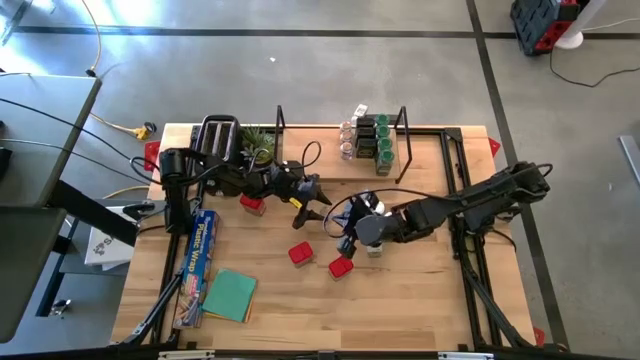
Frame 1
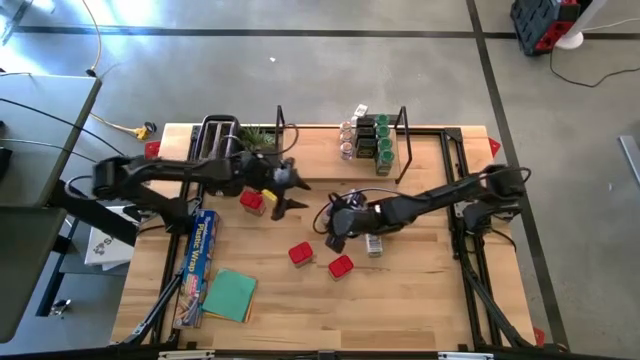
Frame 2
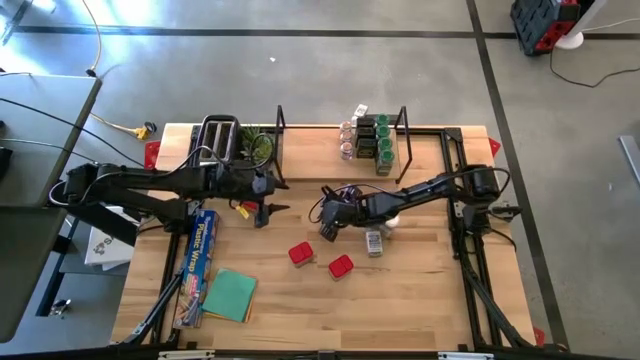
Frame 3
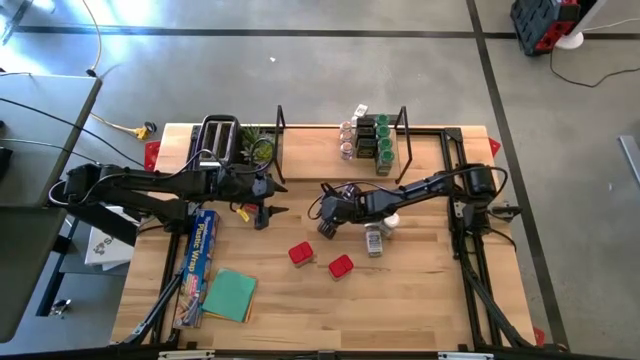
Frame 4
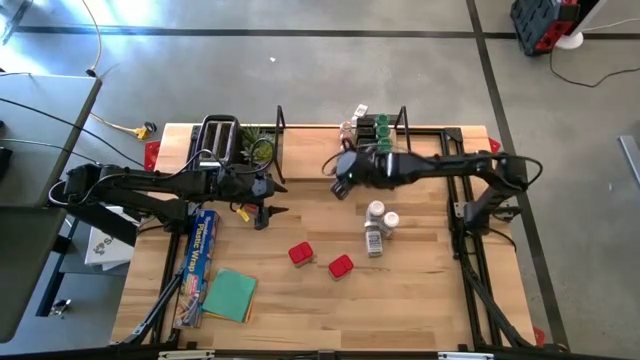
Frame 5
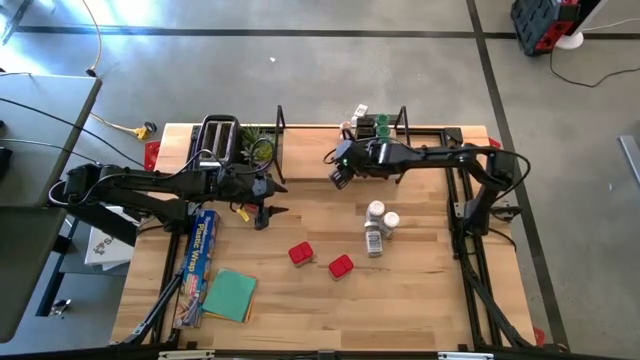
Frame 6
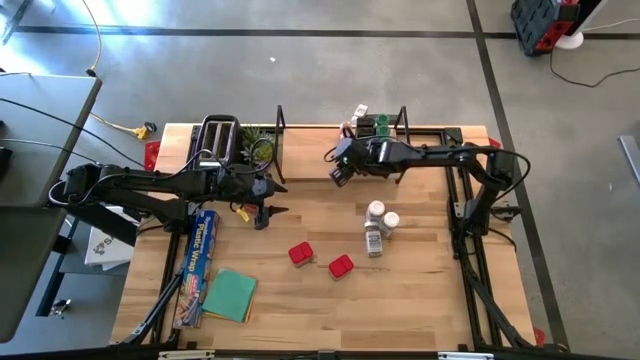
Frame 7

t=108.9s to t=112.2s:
Task: Shelf spices
Put the brown seasoning bottle on the shelf aligned with the other brown seasoning bottles

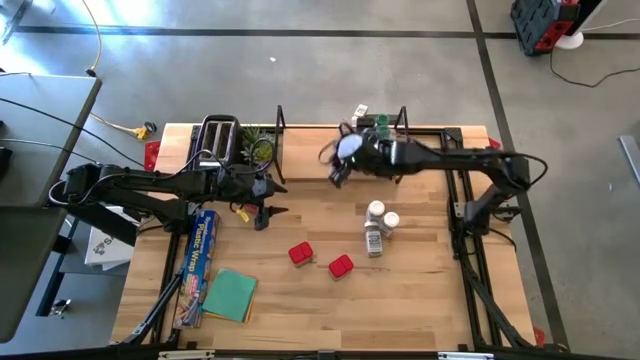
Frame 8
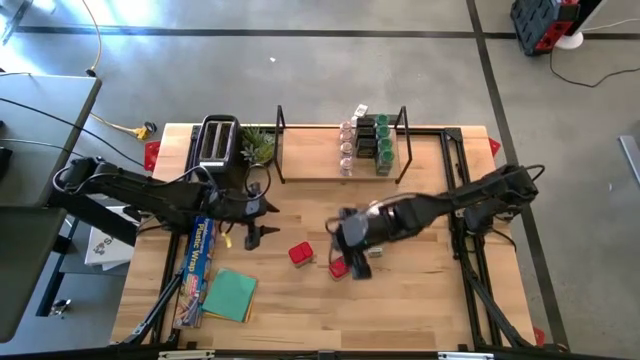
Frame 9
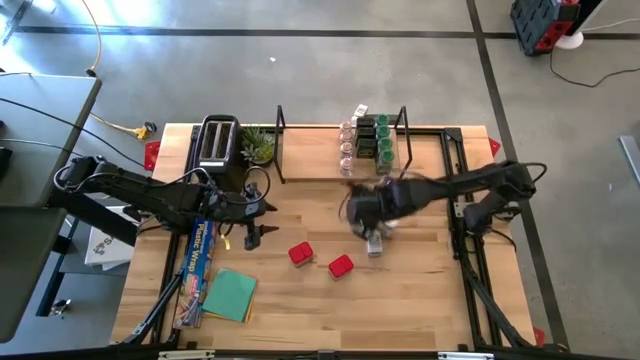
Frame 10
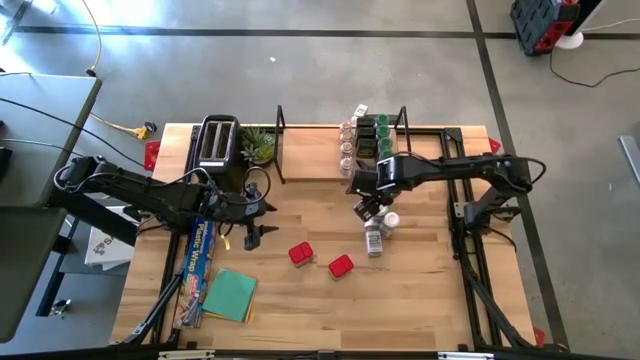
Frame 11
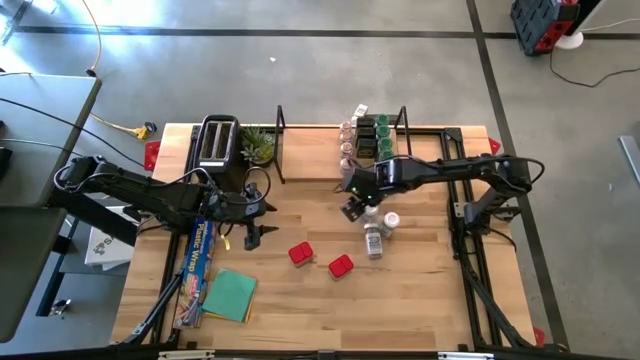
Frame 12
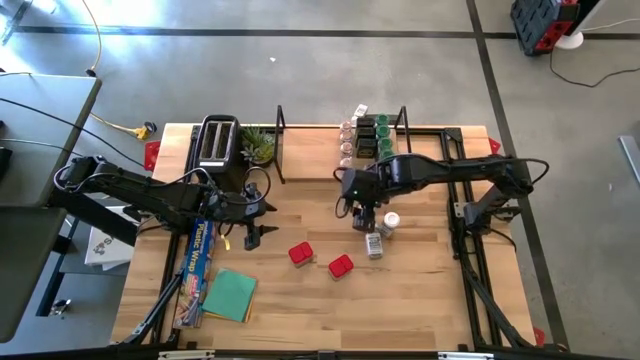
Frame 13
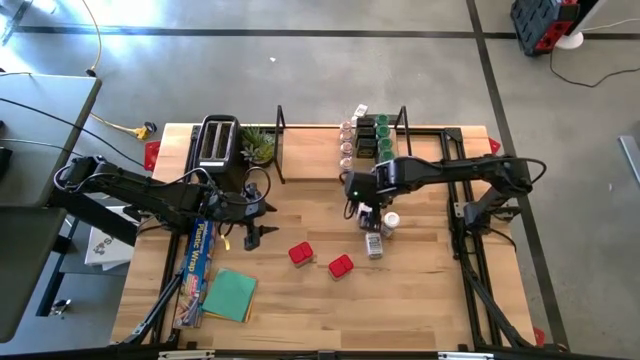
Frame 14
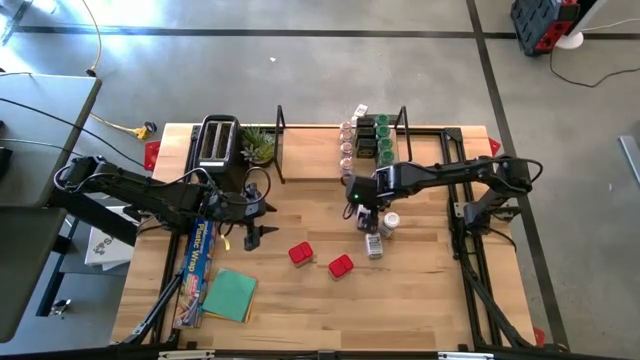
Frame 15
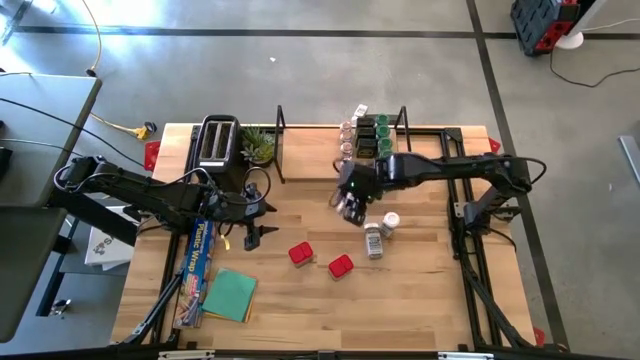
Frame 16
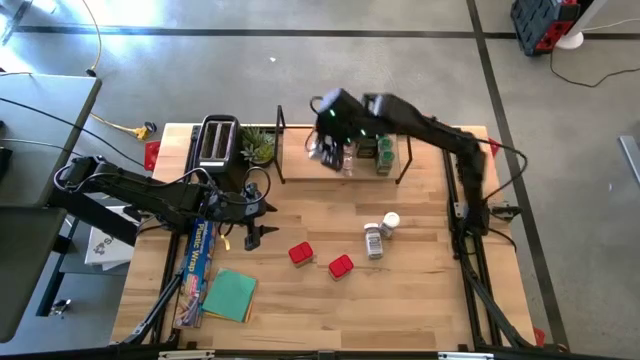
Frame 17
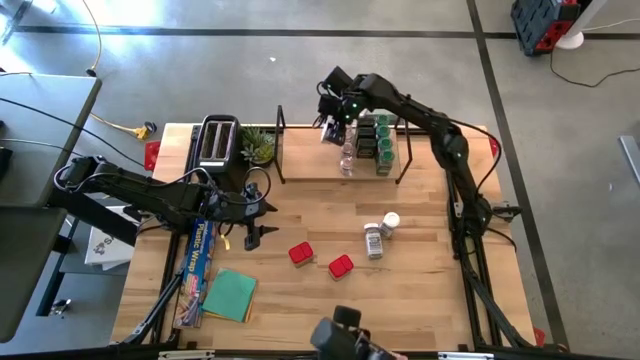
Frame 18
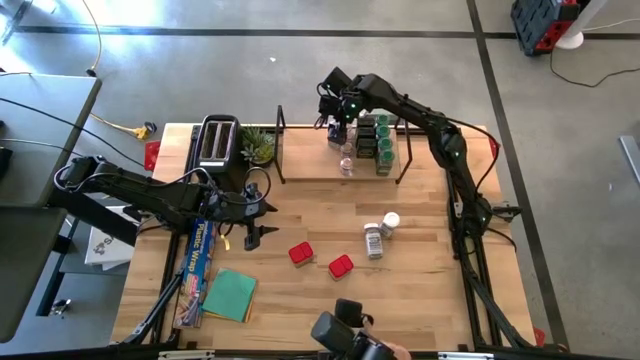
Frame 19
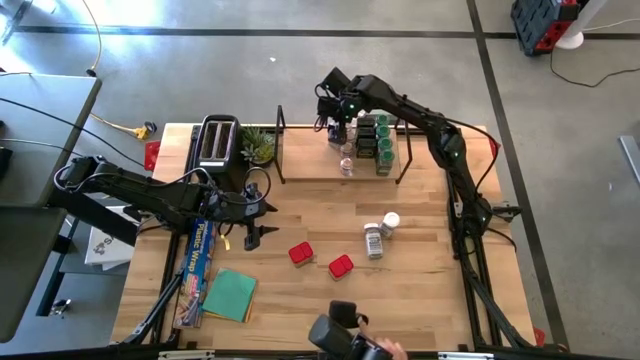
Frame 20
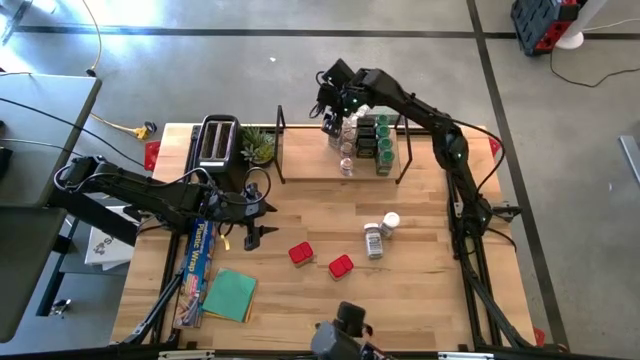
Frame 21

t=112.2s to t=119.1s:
Put the top white seasoning bottle on the shelf

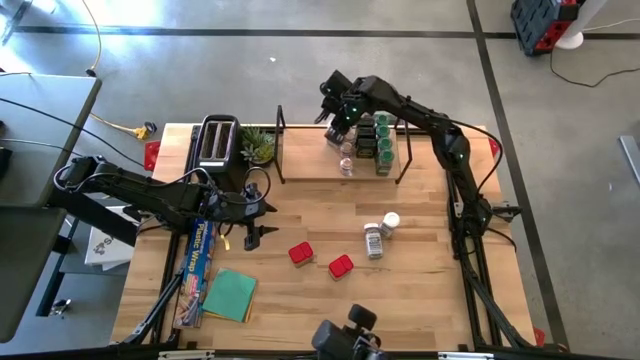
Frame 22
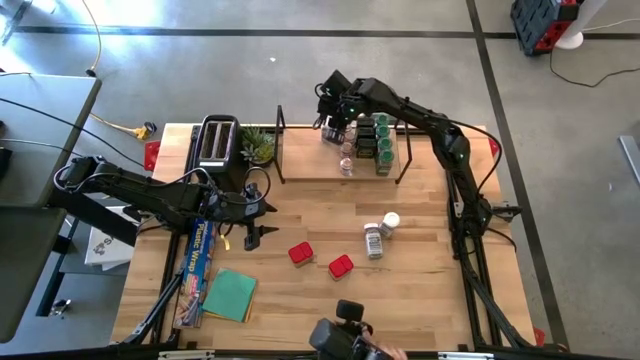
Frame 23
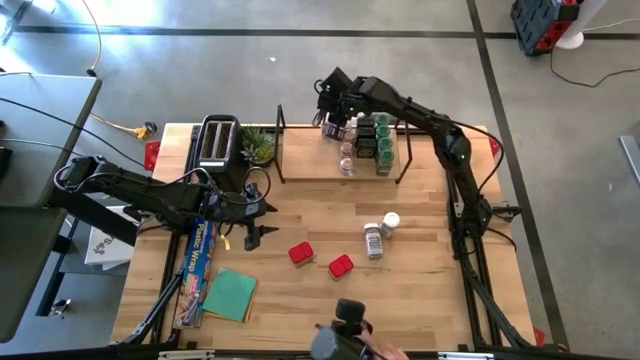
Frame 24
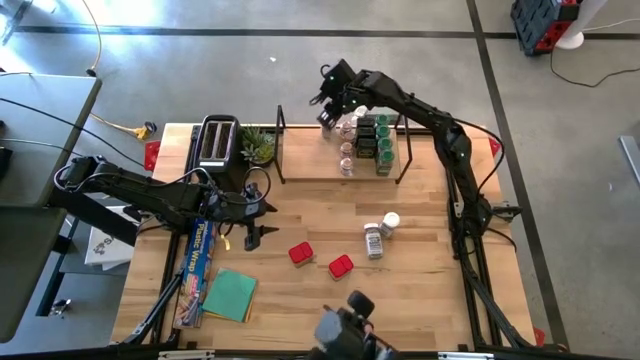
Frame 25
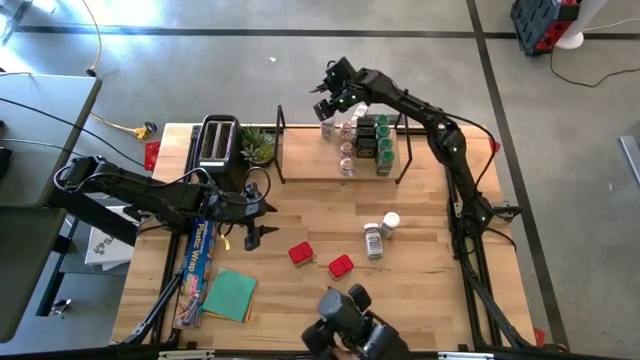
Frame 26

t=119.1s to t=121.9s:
Adjust the white seasoning bottle

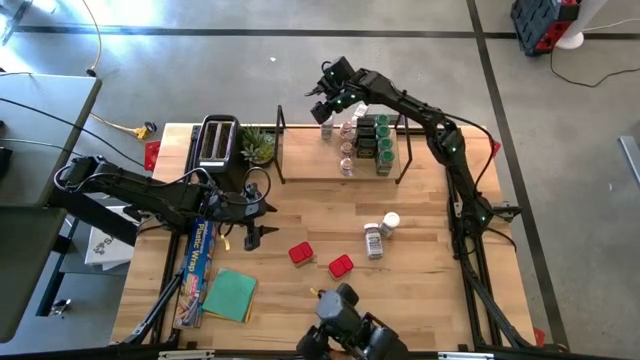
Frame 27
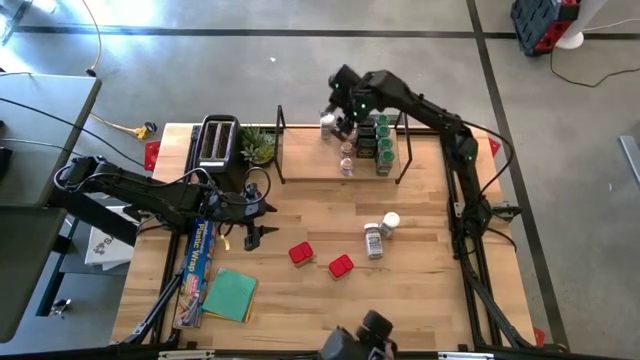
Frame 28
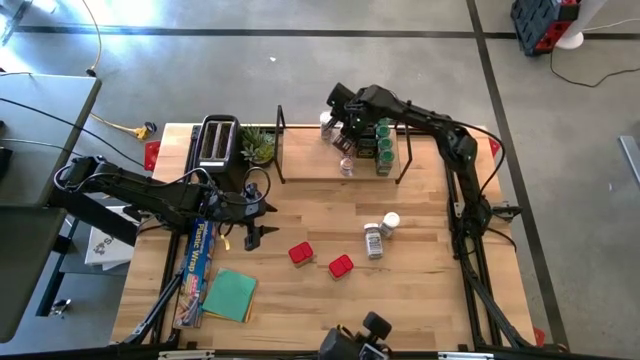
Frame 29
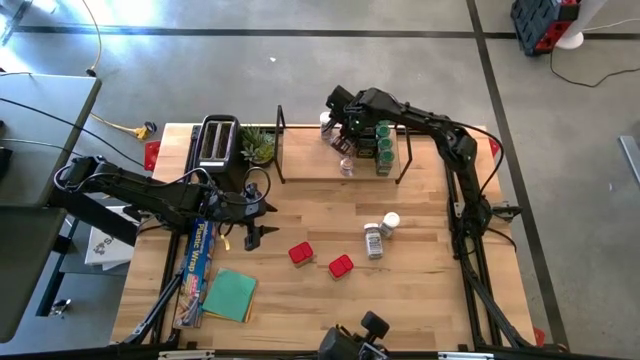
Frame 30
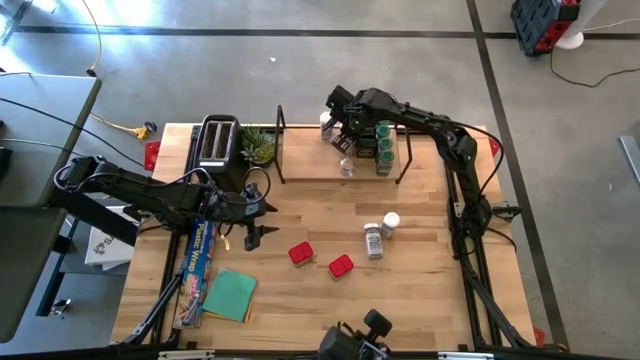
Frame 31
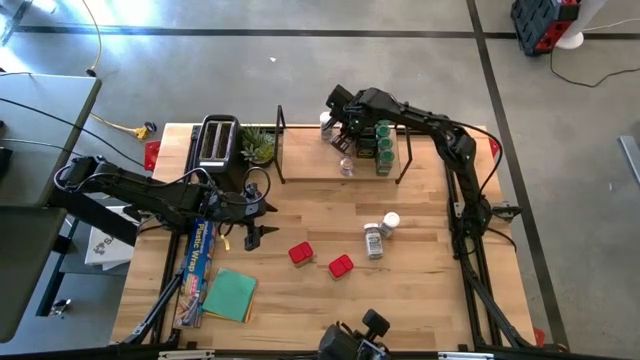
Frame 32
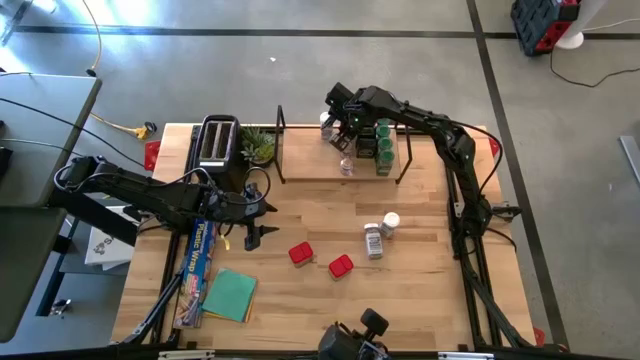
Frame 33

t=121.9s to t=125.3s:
Adjust the brown seasoning bottle

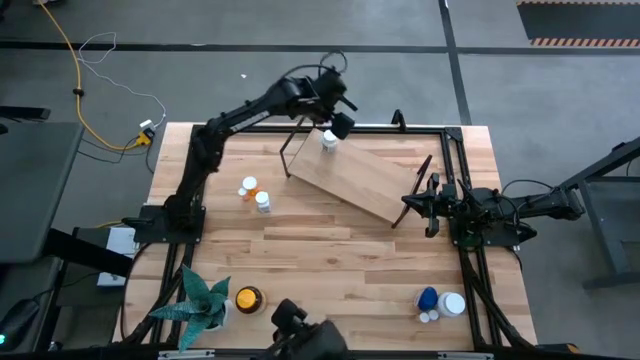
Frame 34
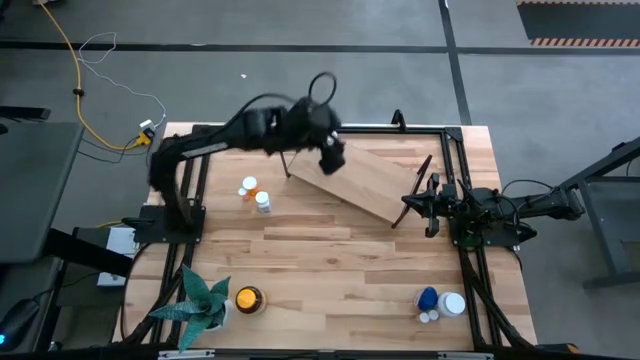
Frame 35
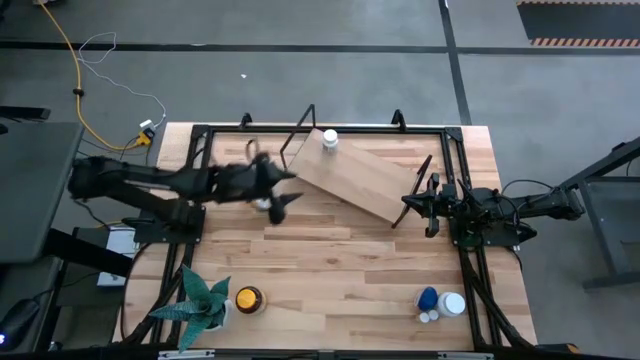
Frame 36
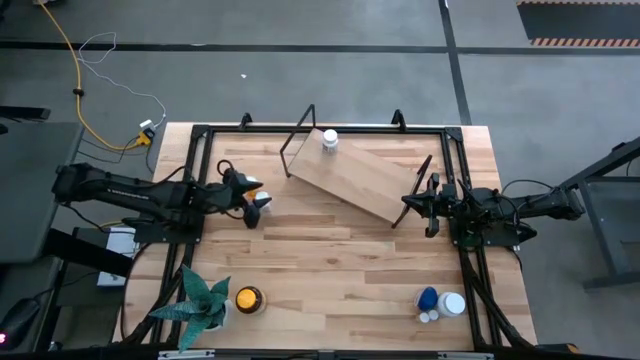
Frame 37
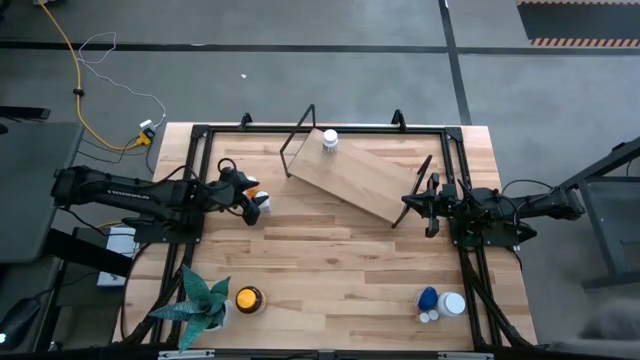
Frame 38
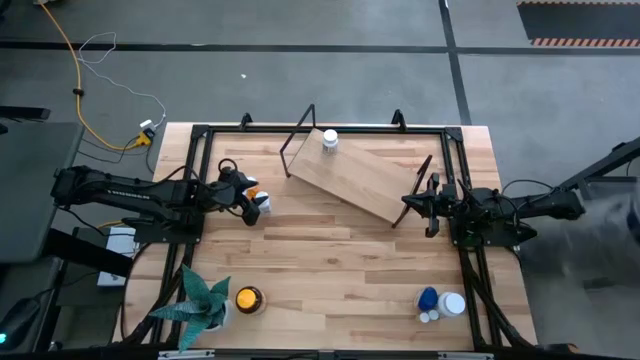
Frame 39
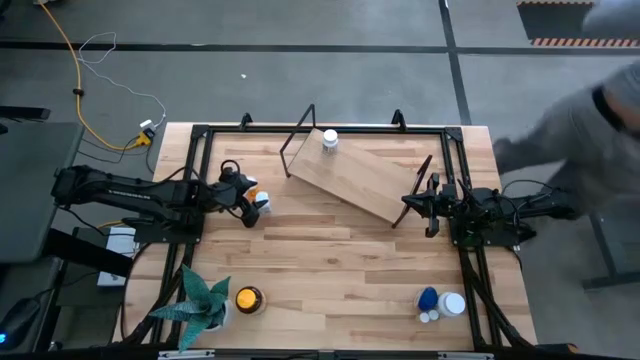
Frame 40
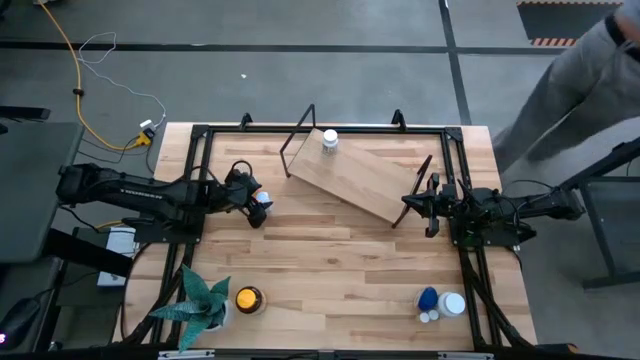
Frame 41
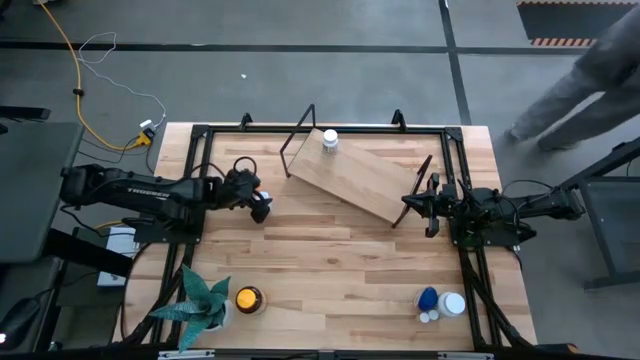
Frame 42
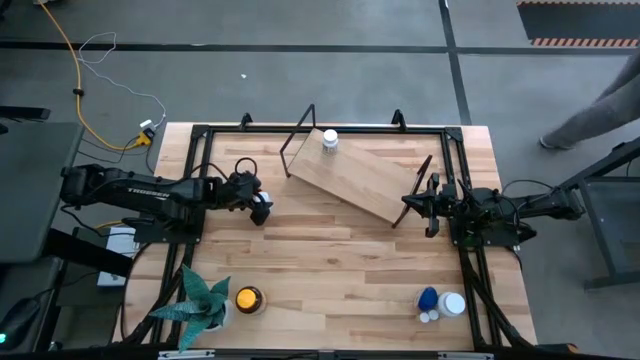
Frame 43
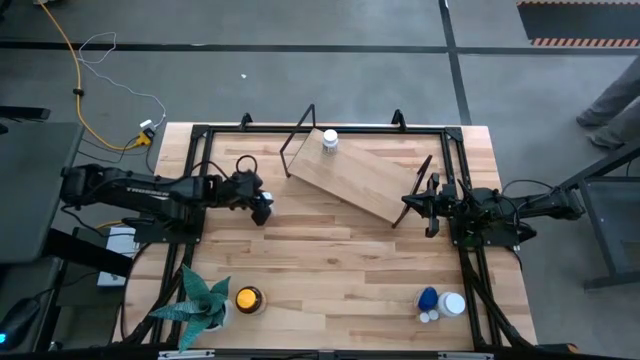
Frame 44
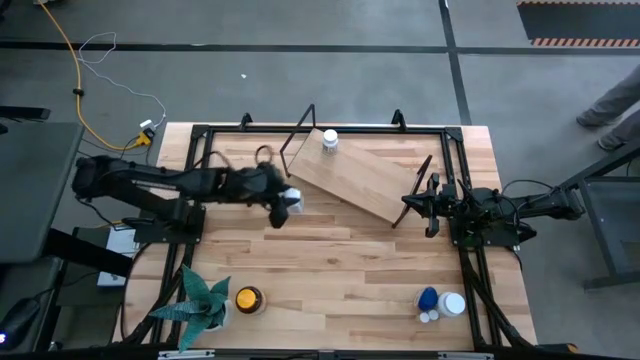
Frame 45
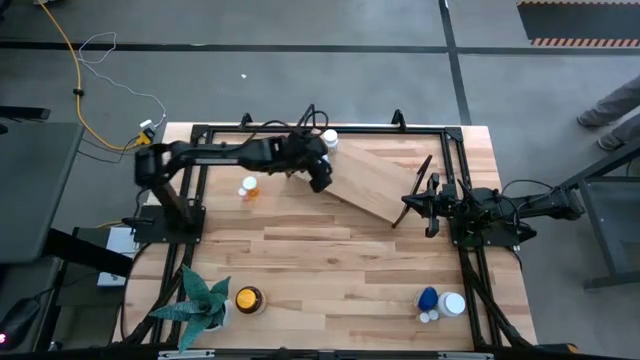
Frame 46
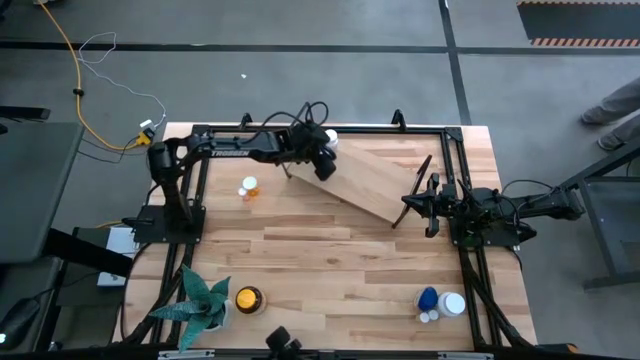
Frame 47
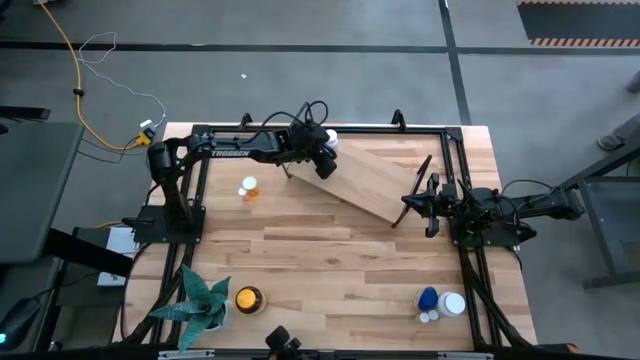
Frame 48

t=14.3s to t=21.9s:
Task: Pick and place medicine bottles onto shelf by color
Put the top white pill bottle on the shelf
